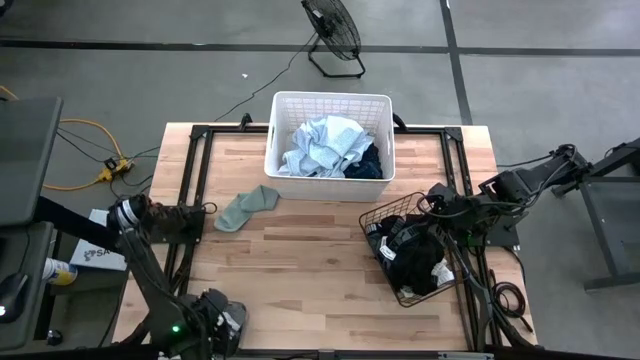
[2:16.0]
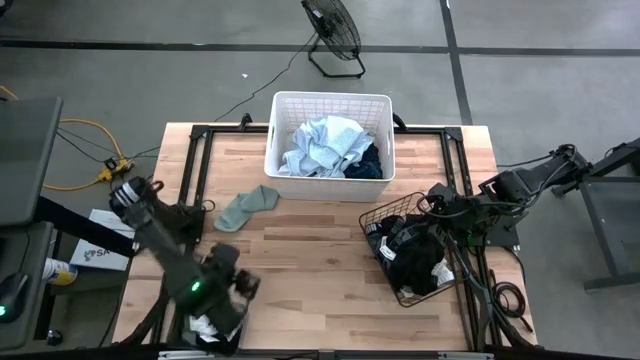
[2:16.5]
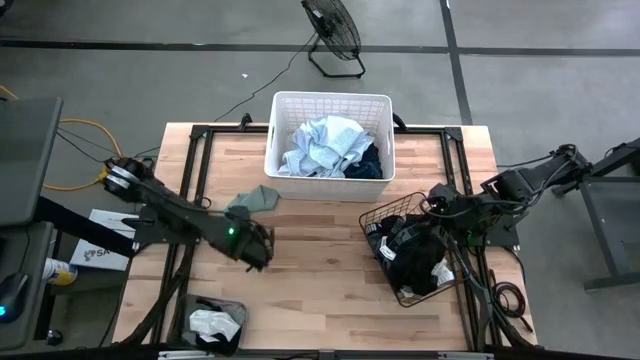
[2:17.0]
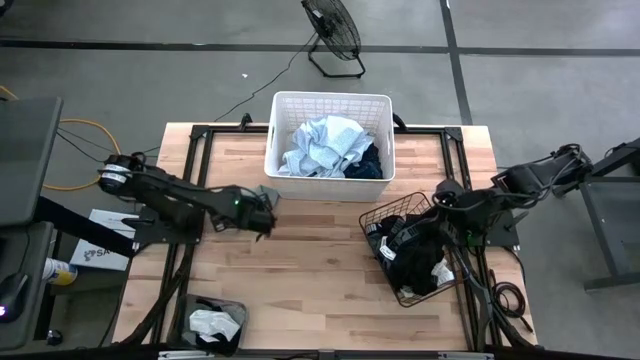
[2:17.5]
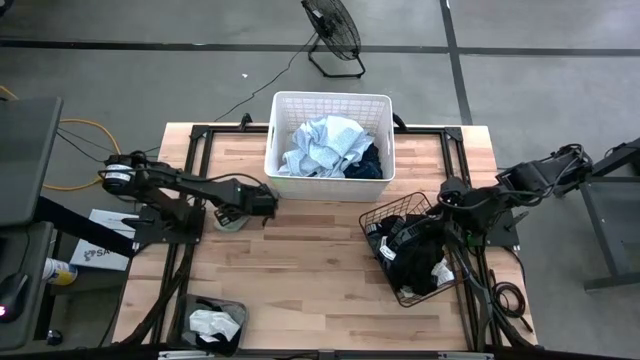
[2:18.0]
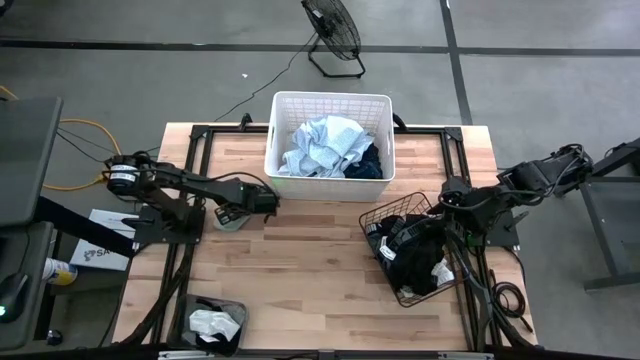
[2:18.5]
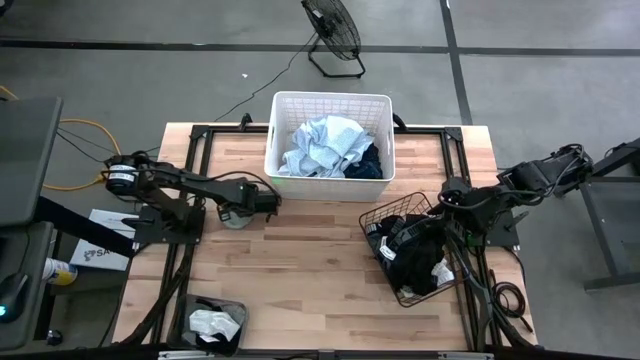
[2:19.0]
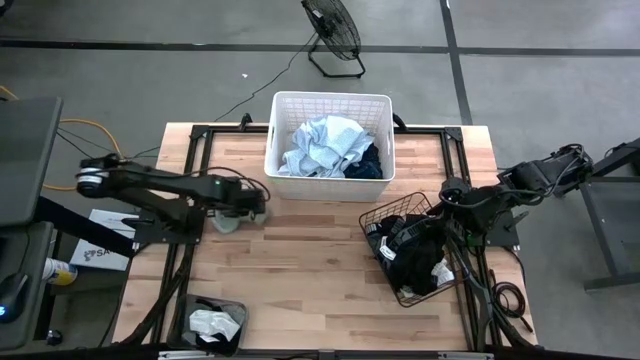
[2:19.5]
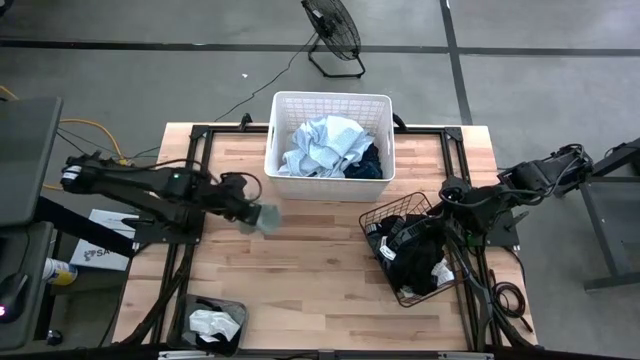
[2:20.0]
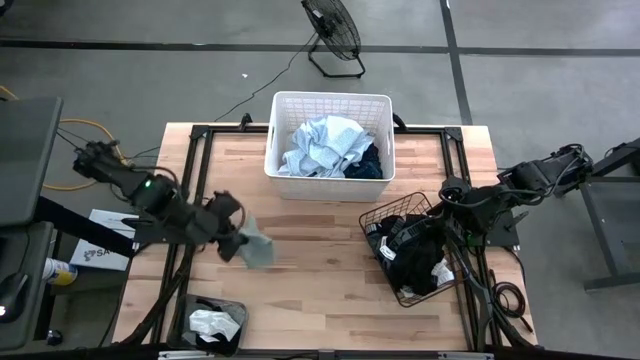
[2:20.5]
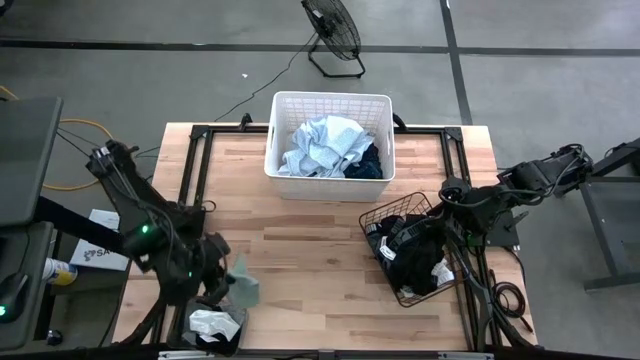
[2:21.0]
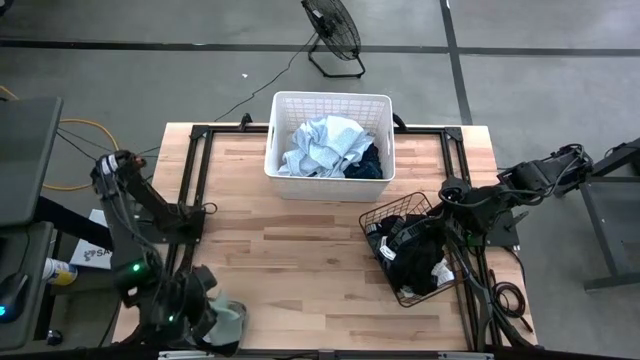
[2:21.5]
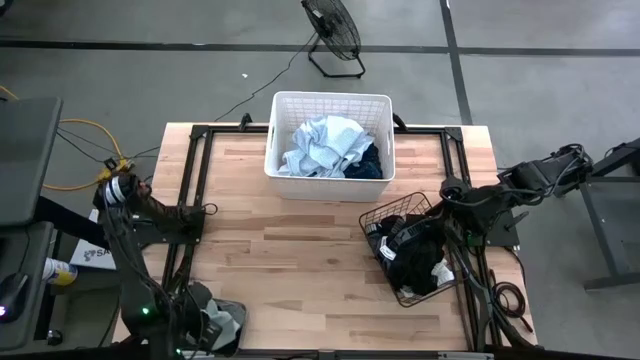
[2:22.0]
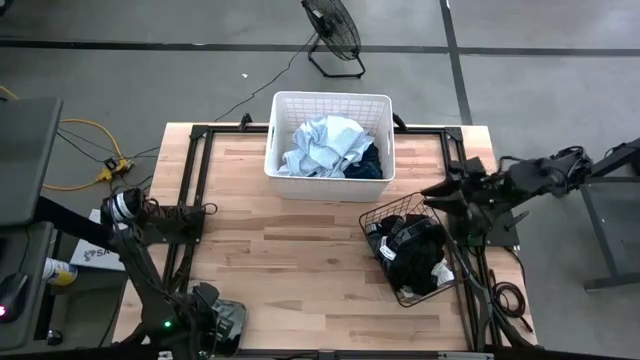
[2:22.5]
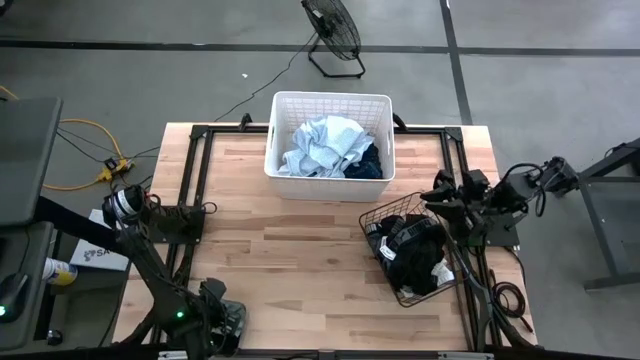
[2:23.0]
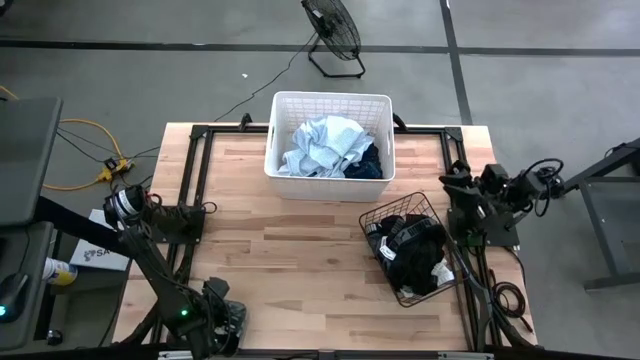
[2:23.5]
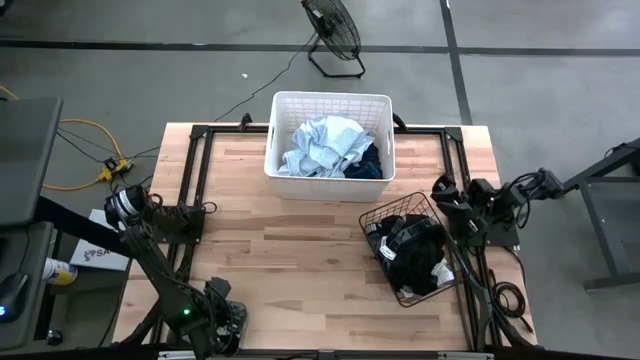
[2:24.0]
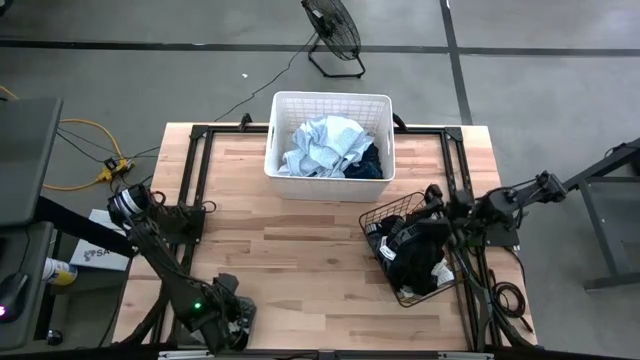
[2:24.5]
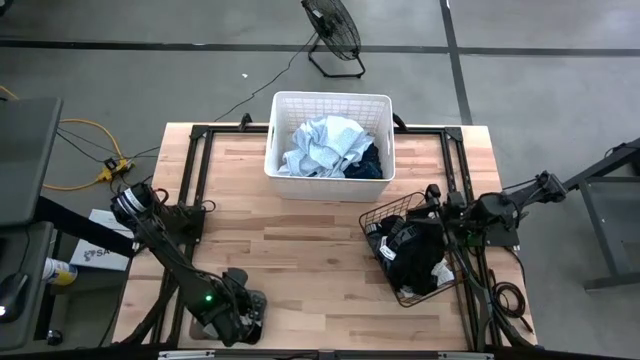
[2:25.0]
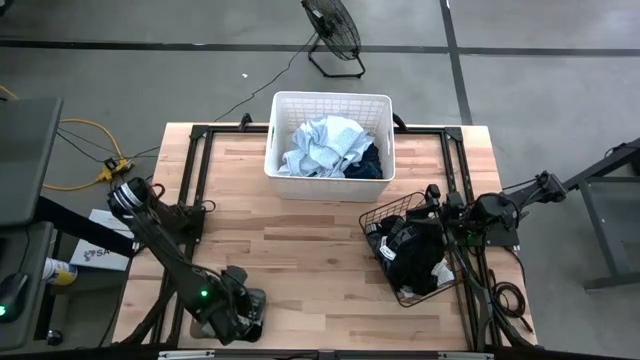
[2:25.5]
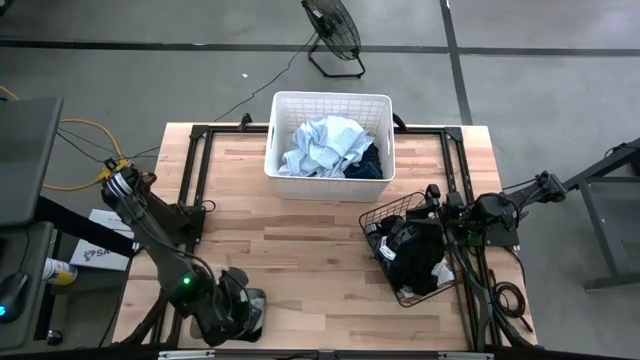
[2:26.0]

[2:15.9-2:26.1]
Task: Pick & Place Cloths
Put the gray sock into the black bin

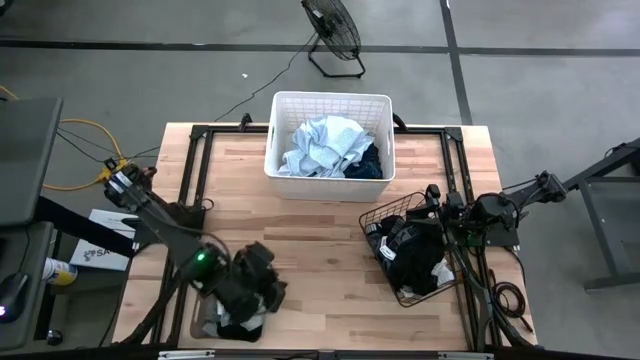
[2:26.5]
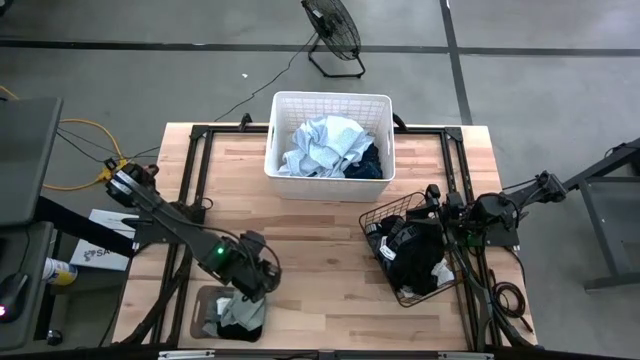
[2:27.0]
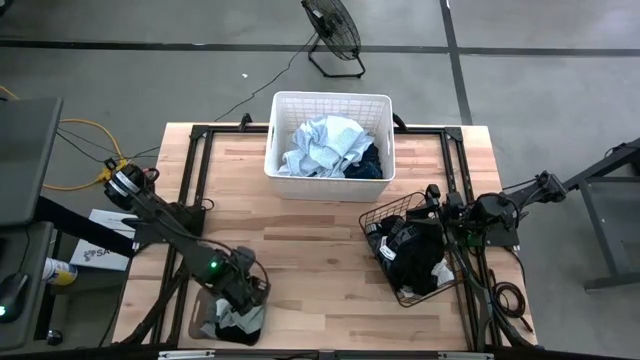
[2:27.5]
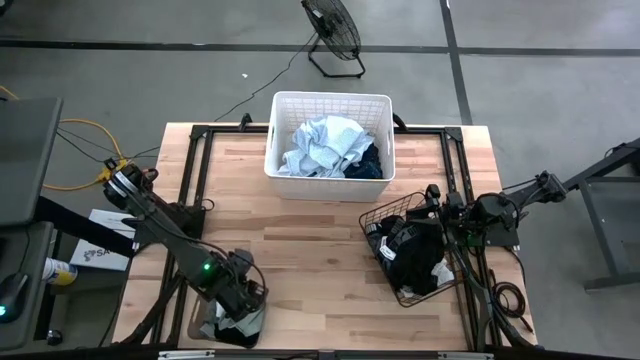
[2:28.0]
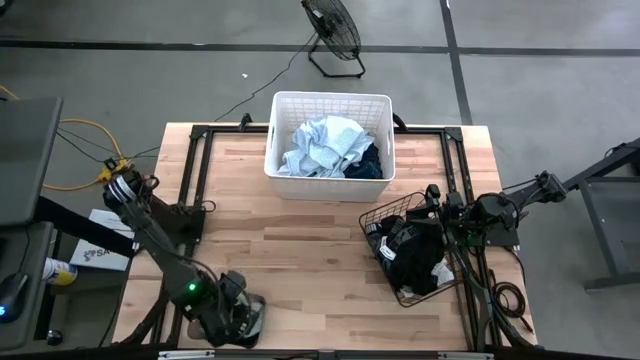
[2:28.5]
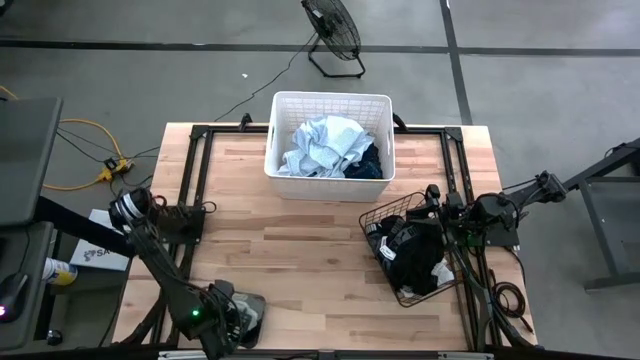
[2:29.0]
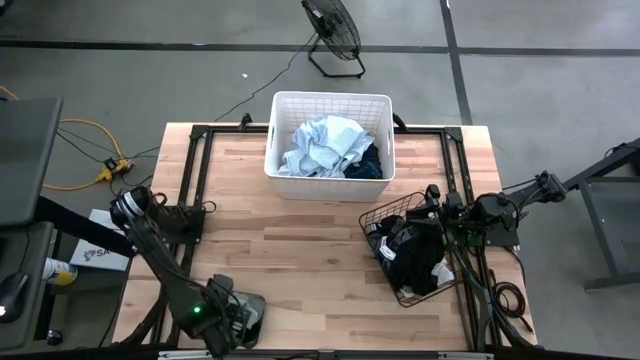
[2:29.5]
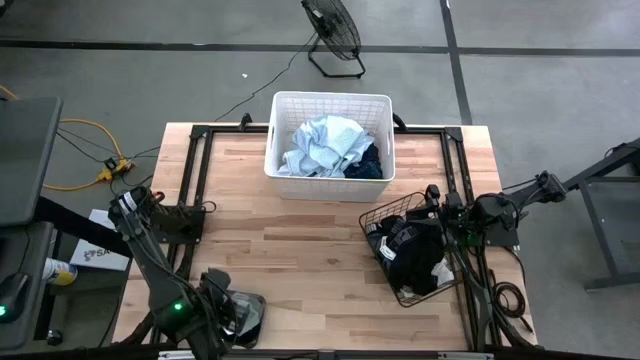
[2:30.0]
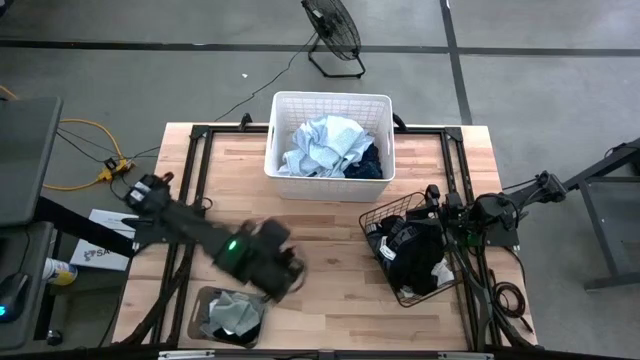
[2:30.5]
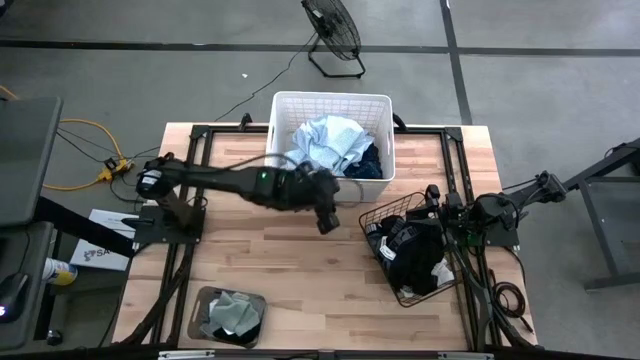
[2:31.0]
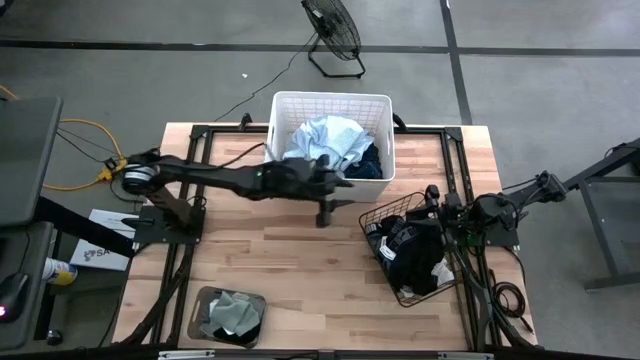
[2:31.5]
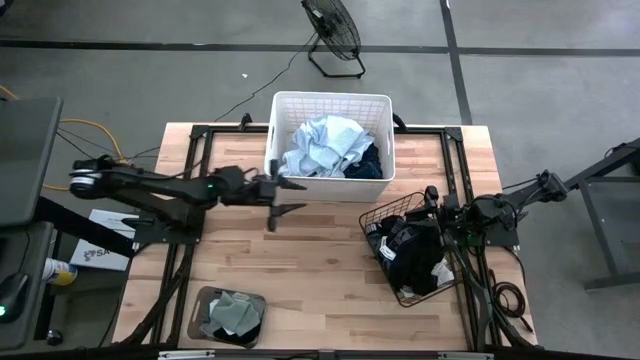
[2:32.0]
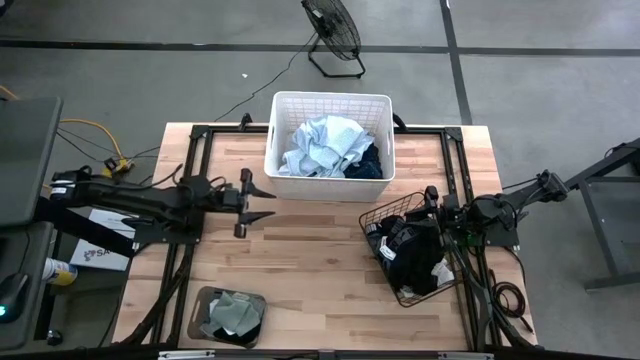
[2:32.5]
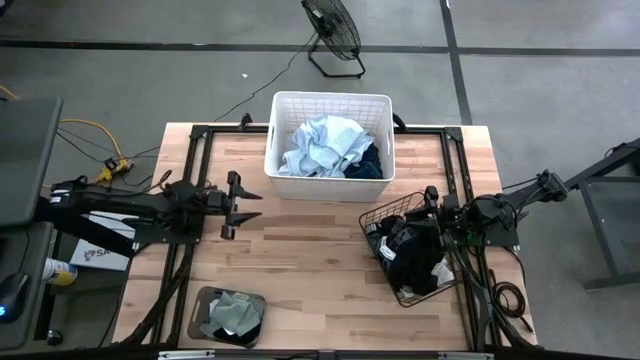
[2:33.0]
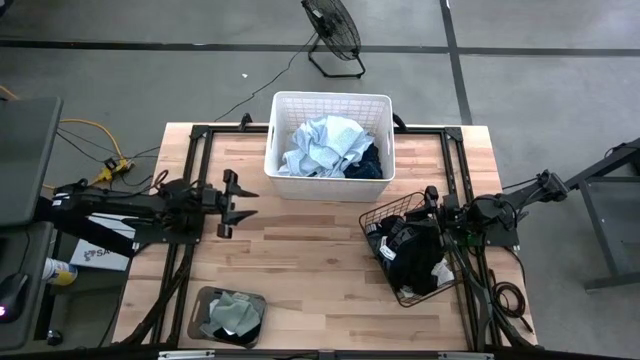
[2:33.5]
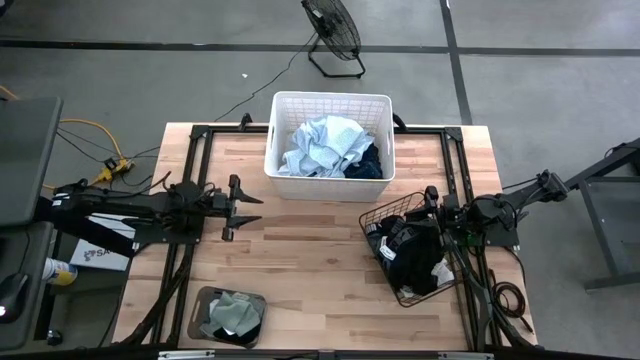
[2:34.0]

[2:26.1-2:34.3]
Return to Home Position

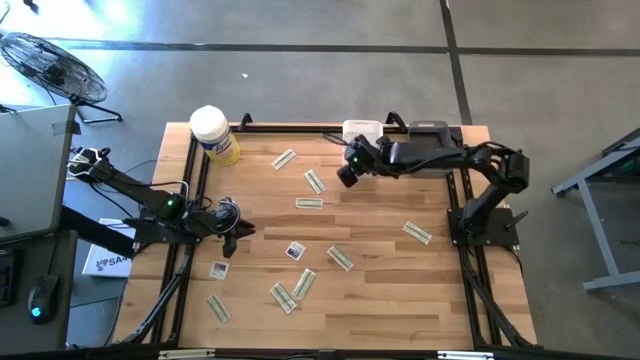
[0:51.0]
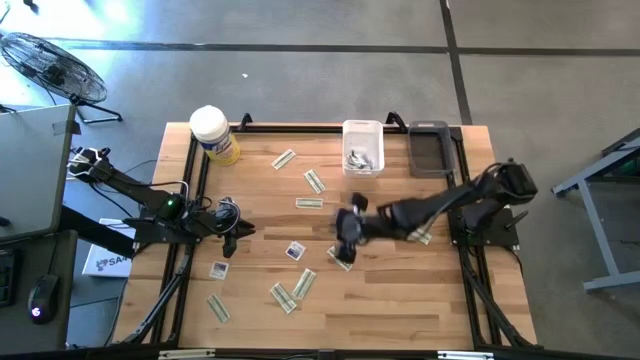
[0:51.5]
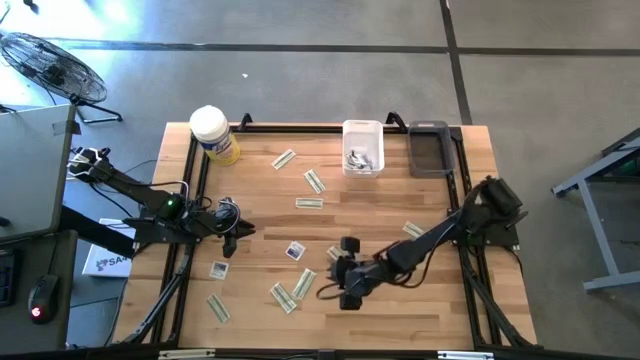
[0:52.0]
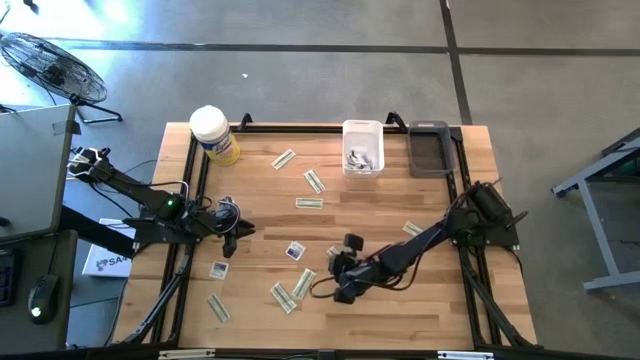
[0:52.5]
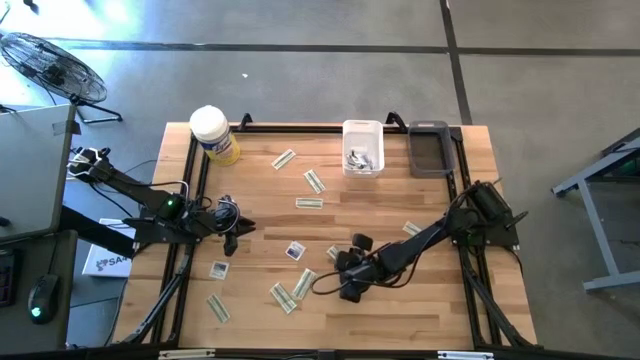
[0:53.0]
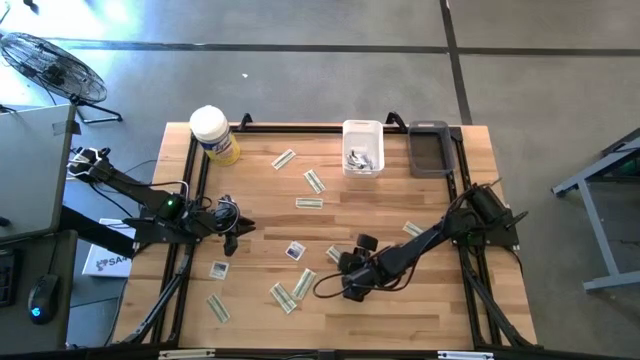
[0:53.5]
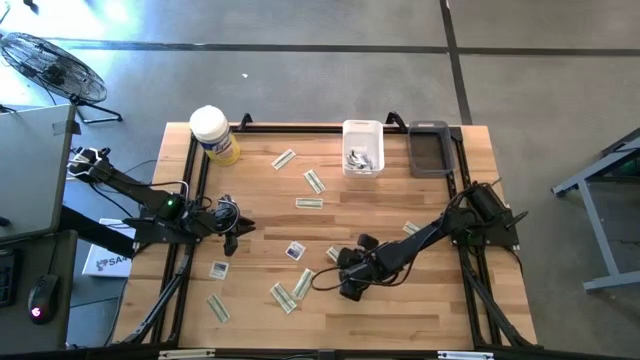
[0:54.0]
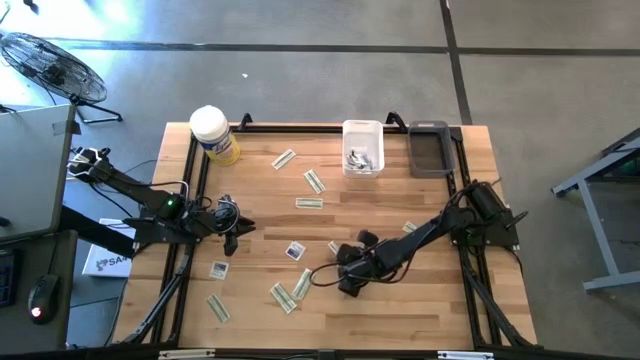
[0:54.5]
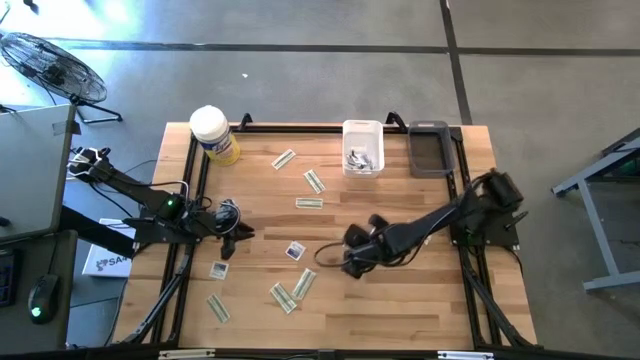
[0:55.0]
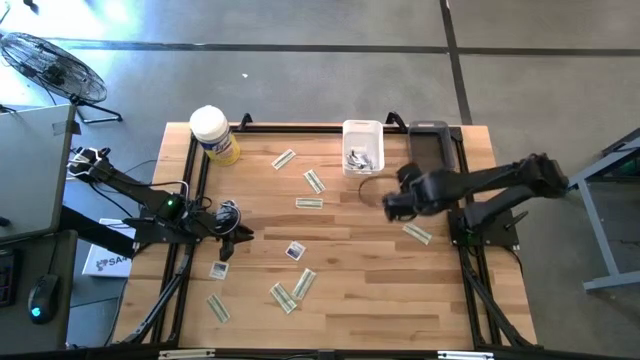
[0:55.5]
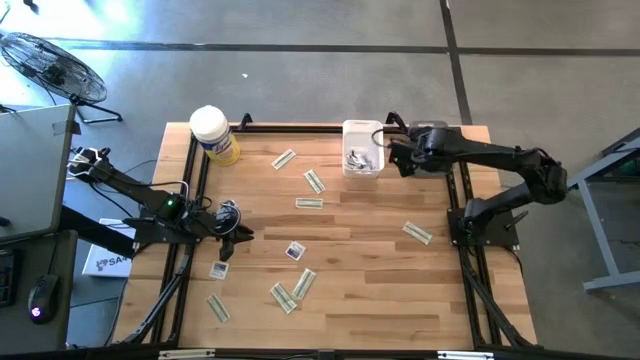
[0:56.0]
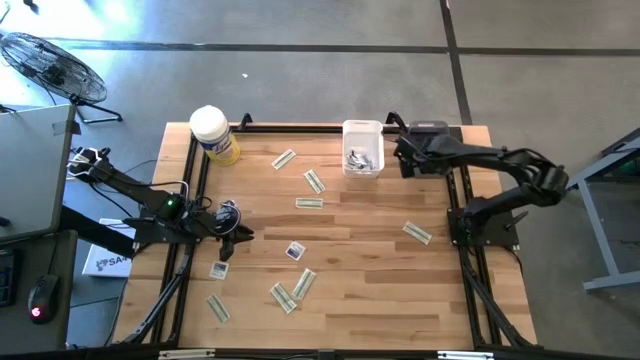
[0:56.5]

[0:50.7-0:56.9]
Task: Pick & Place First Aid Supplies
Put the green bandage into the black bin
